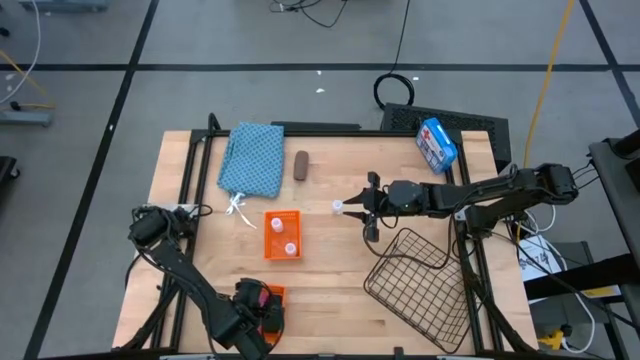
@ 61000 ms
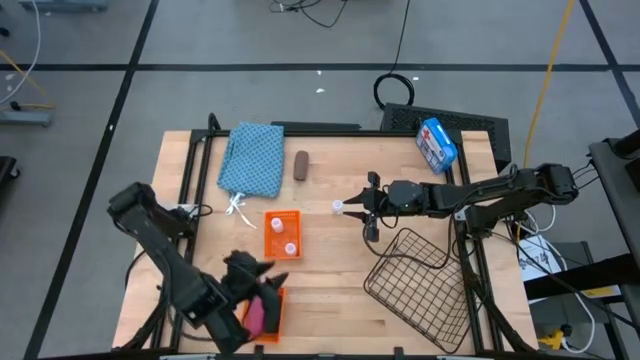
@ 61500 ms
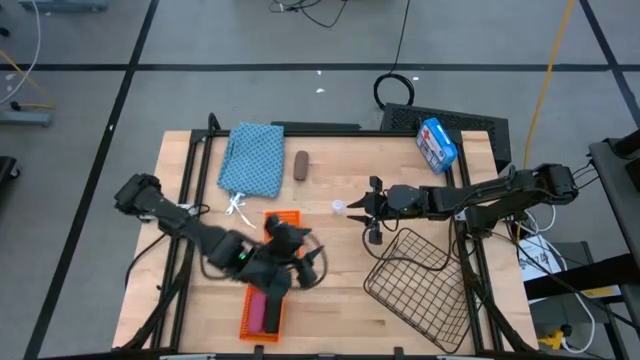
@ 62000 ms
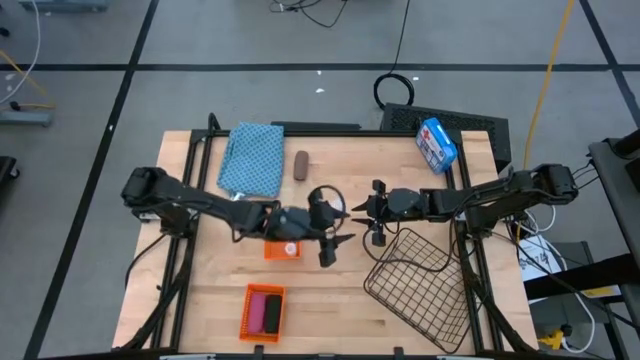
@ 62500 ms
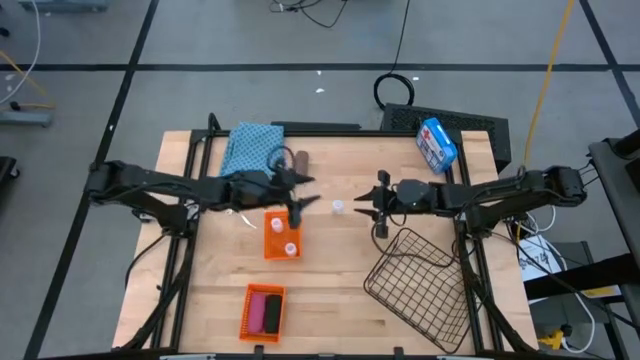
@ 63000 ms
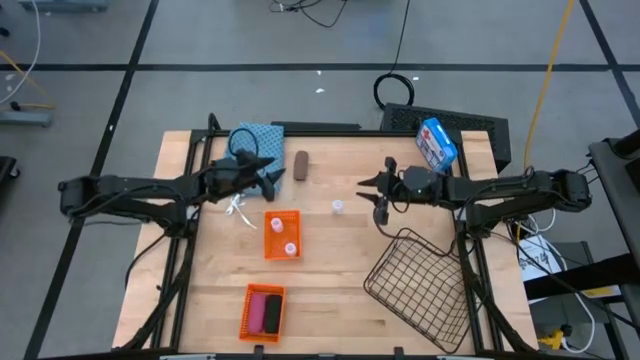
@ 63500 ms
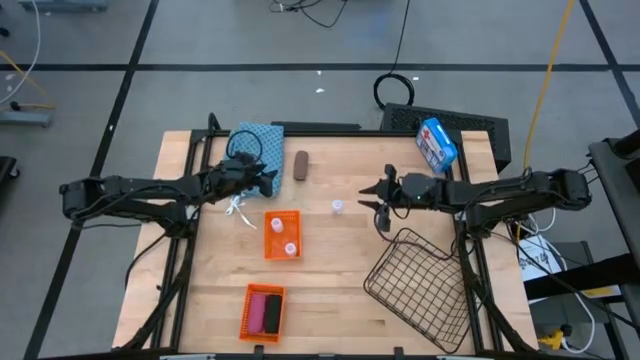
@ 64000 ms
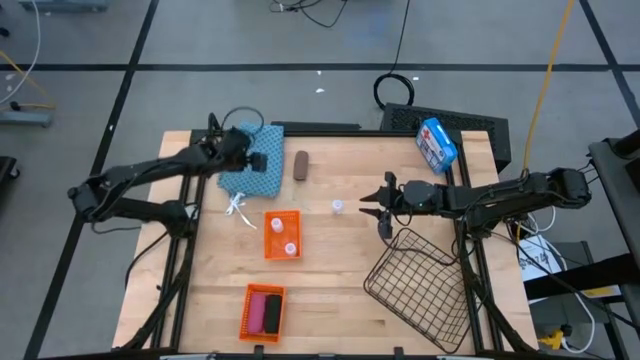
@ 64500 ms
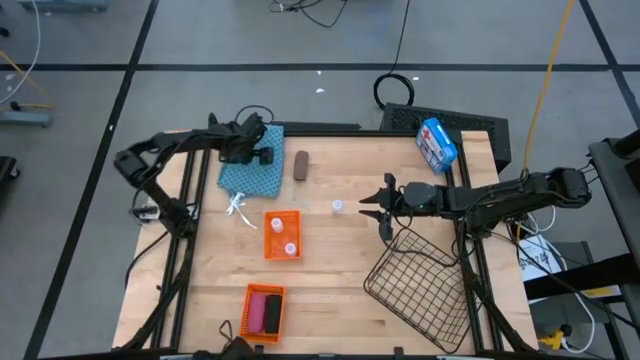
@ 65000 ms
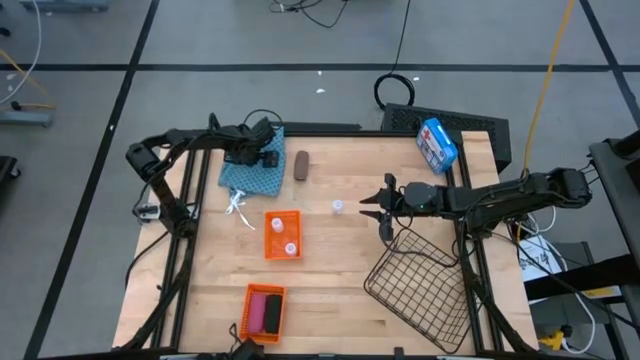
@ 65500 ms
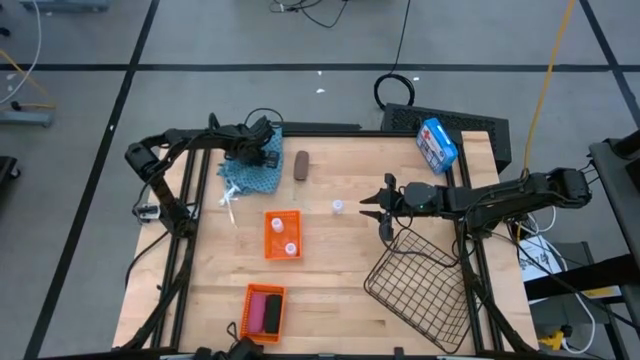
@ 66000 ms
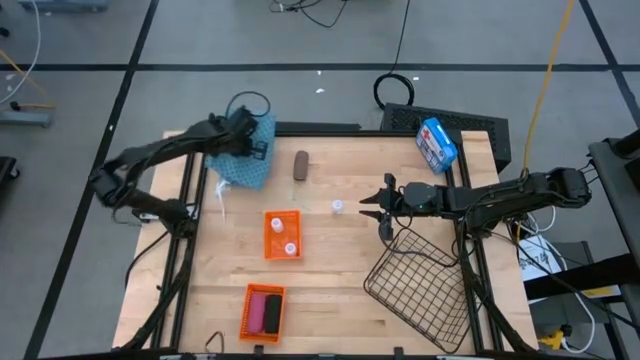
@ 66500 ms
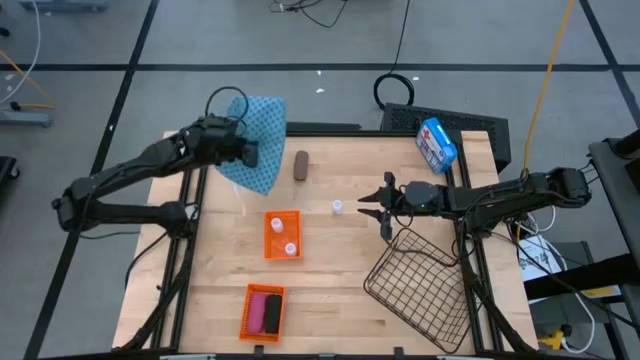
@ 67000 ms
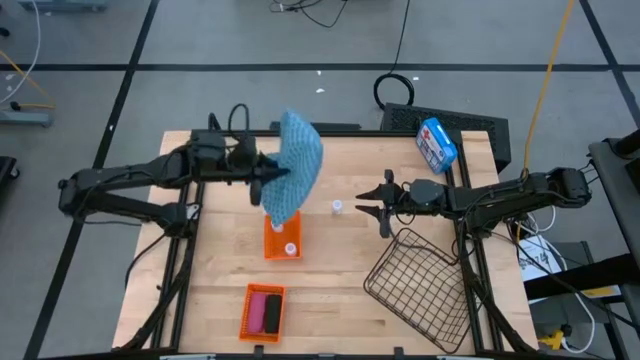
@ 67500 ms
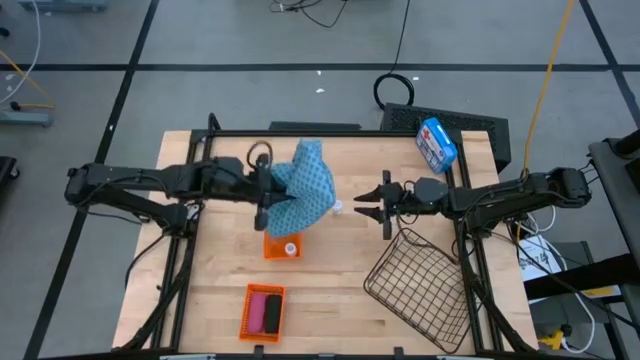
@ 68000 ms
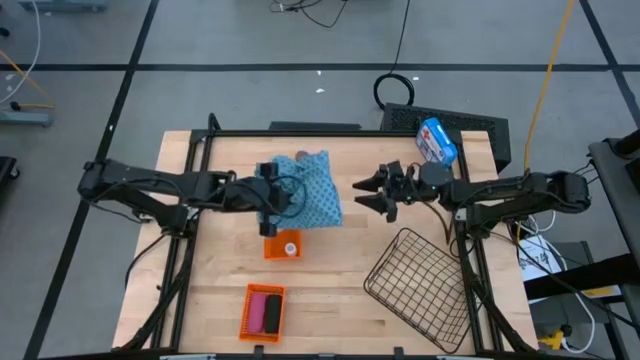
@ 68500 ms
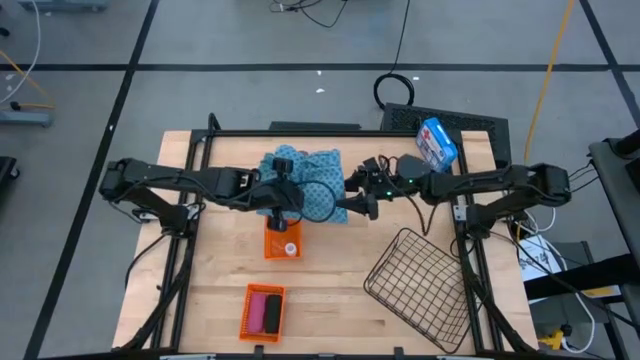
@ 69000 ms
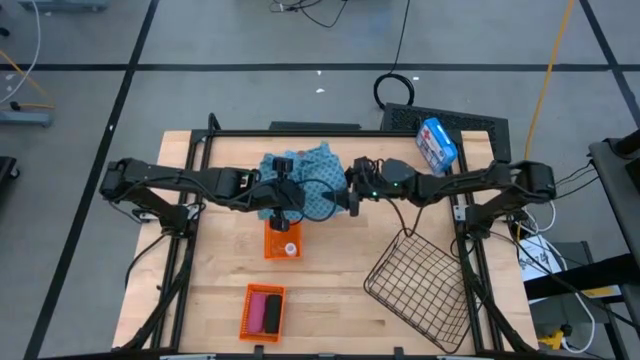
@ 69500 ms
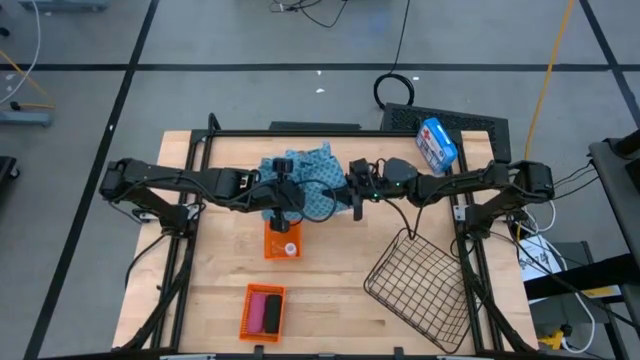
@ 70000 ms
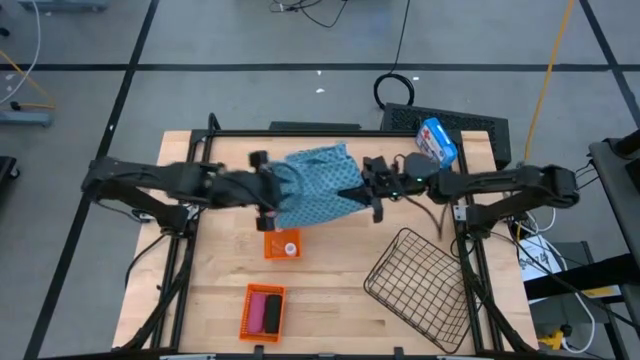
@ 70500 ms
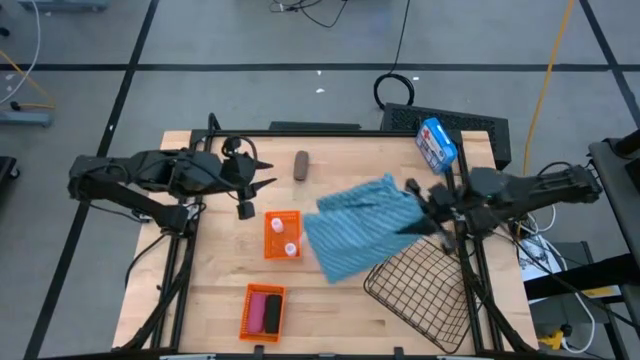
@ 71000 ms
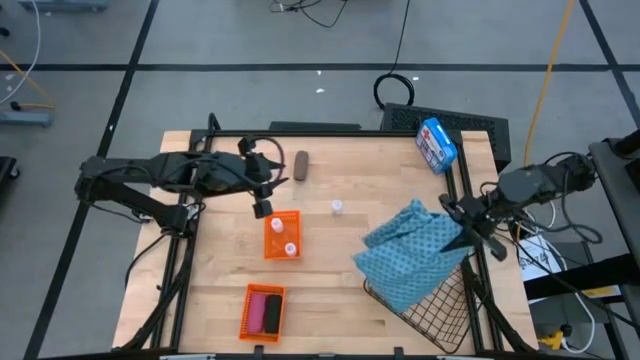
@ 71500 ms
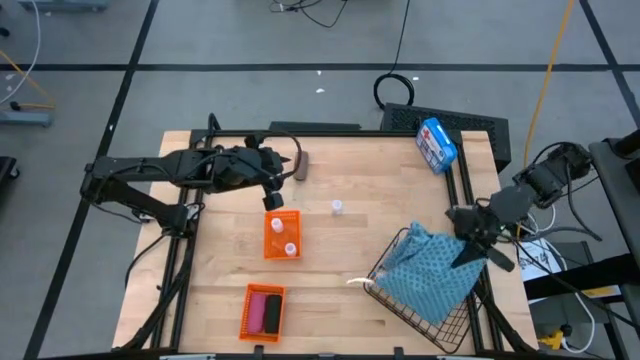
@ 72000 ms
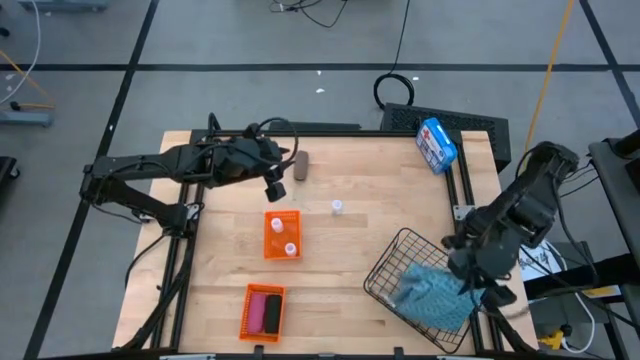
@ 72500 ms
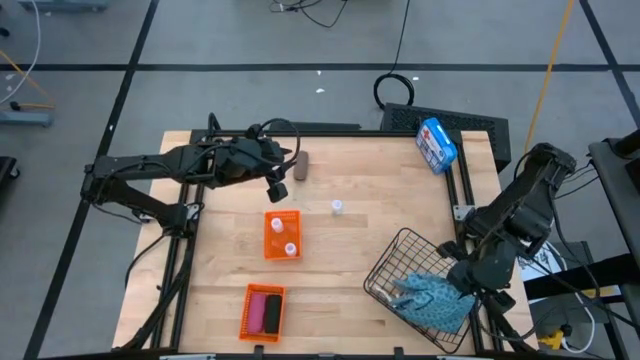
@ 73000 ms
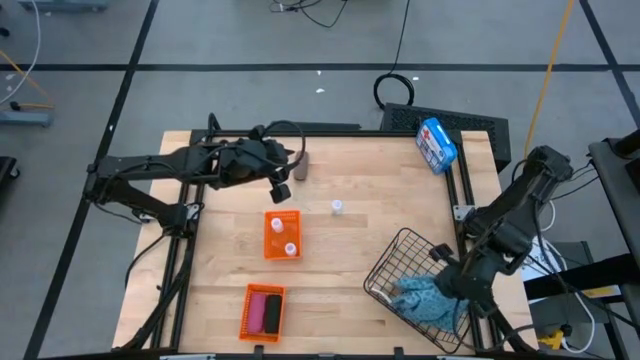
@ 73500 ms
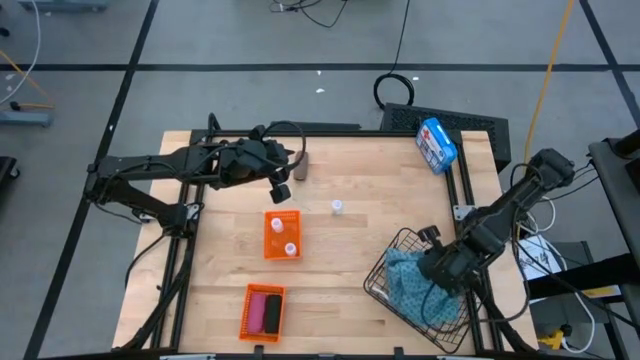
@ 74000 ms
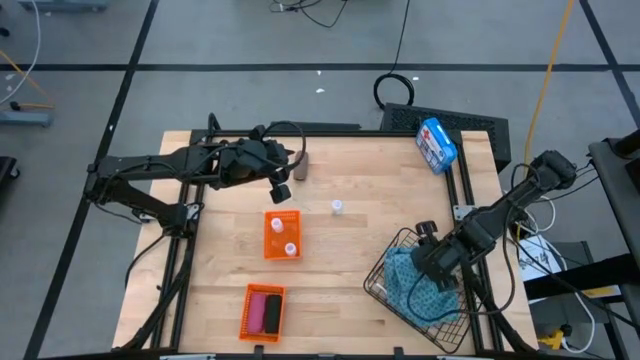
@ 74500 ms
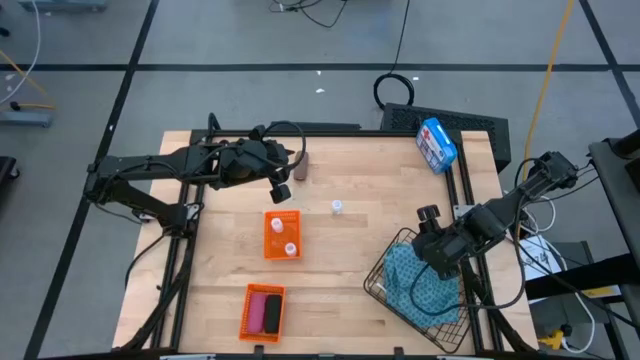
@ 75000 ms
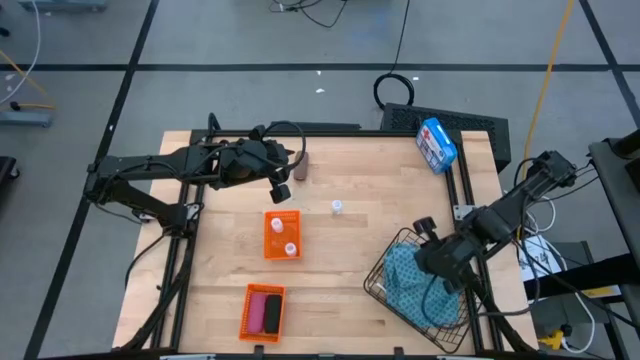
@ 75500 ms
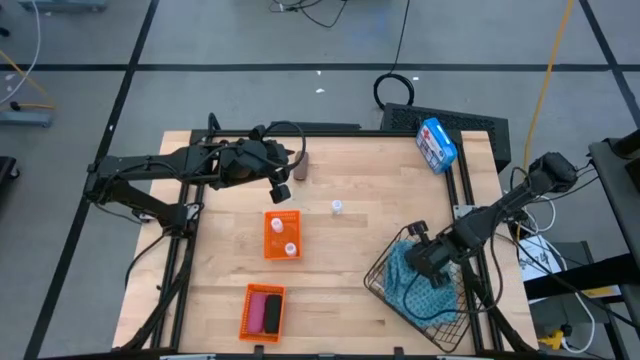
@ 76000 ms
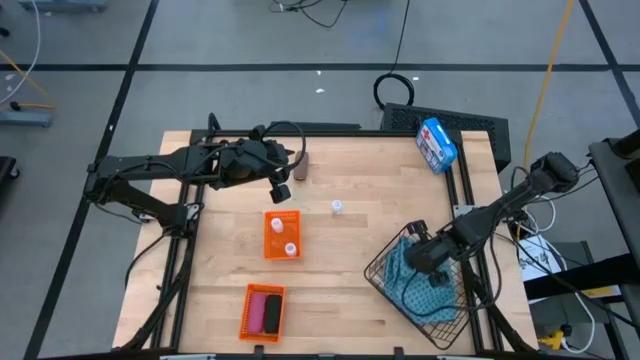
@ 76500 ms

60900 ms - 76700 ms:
Task: Pick & Place Medicine items
Put the blue patient gown into the black wire basket
